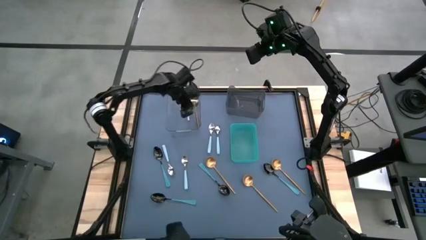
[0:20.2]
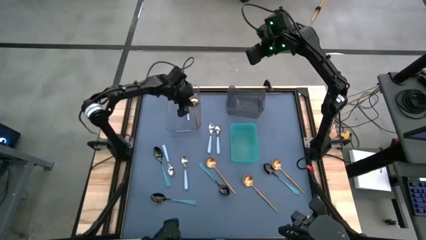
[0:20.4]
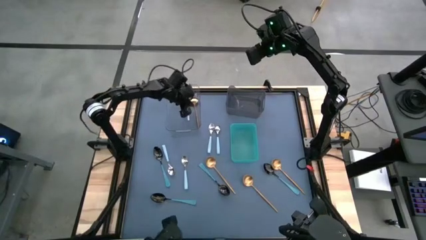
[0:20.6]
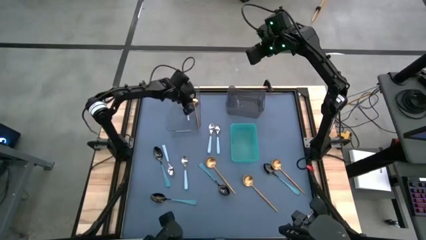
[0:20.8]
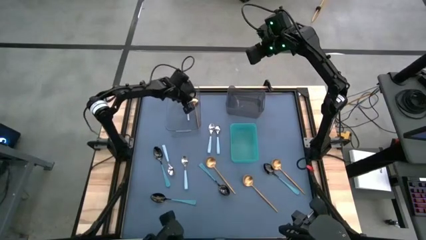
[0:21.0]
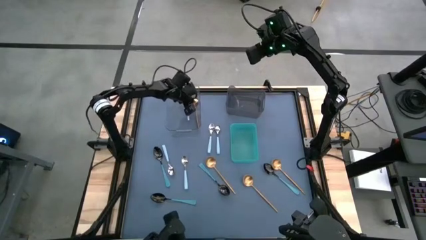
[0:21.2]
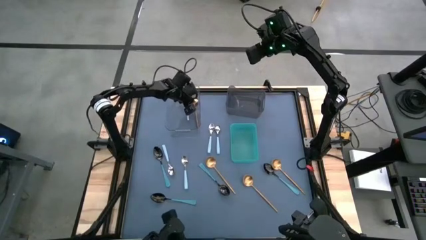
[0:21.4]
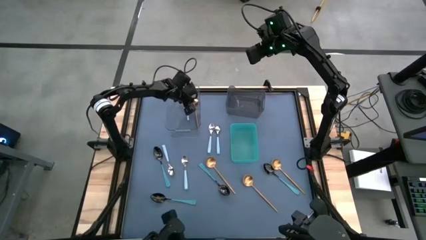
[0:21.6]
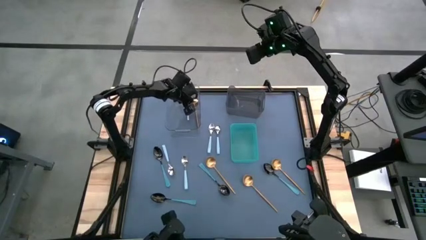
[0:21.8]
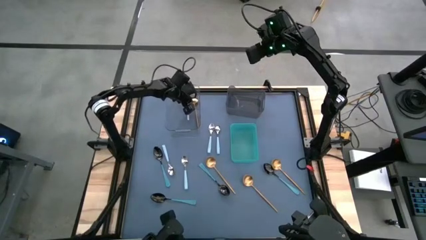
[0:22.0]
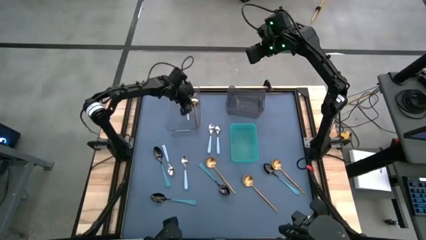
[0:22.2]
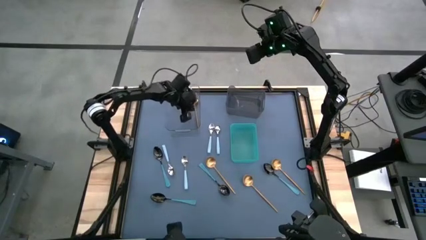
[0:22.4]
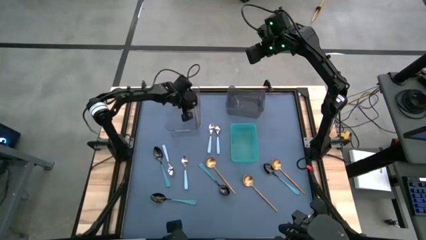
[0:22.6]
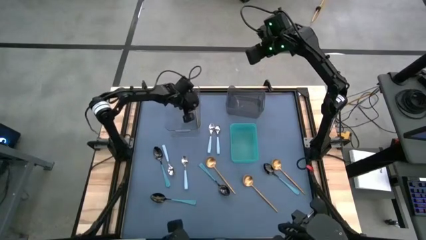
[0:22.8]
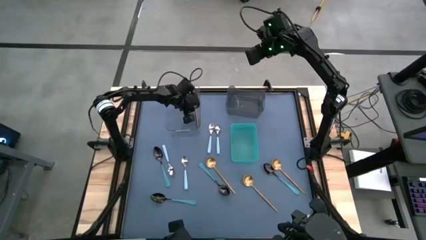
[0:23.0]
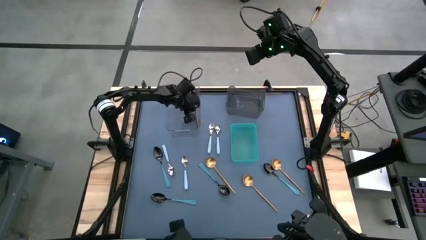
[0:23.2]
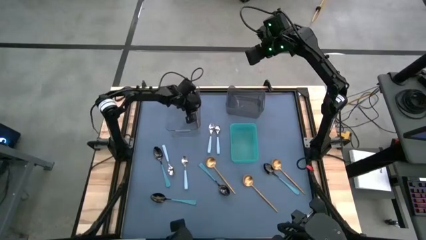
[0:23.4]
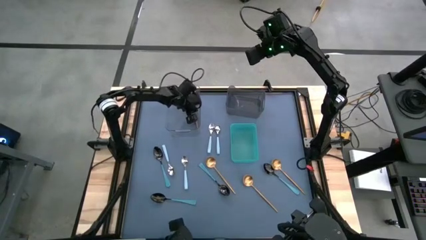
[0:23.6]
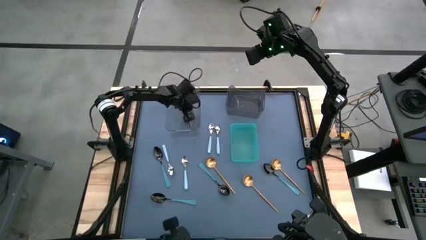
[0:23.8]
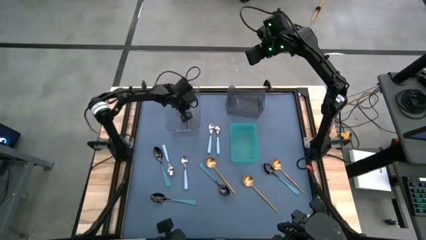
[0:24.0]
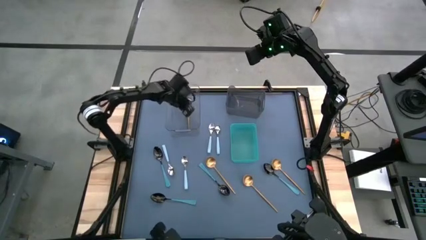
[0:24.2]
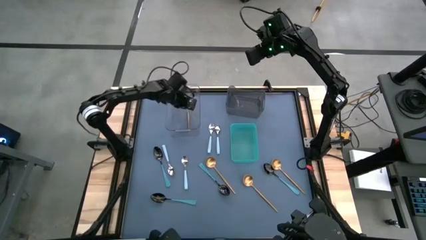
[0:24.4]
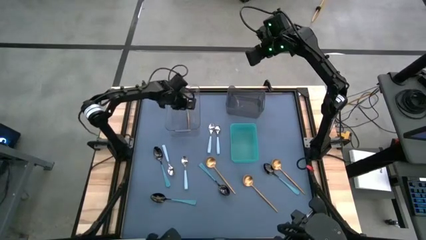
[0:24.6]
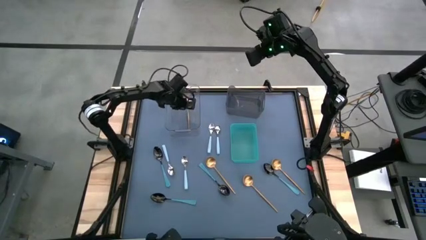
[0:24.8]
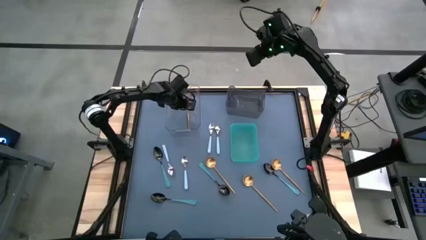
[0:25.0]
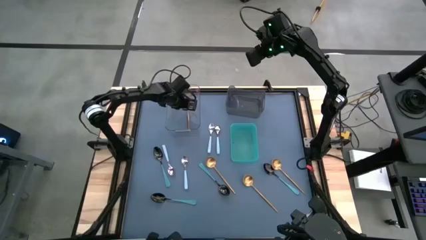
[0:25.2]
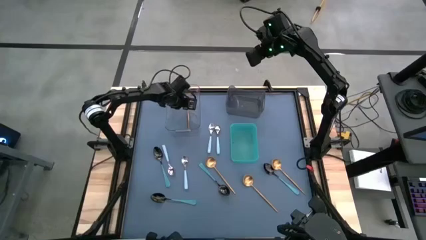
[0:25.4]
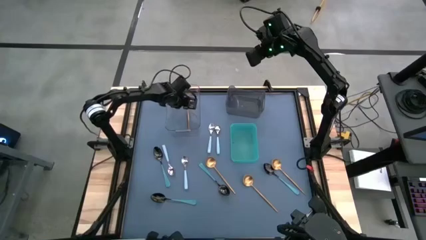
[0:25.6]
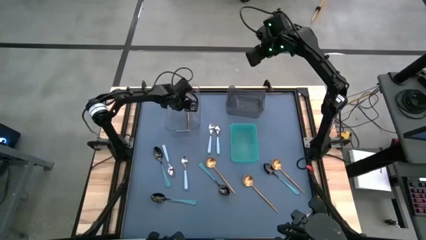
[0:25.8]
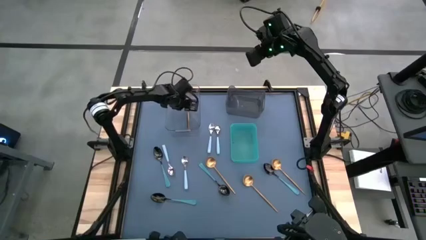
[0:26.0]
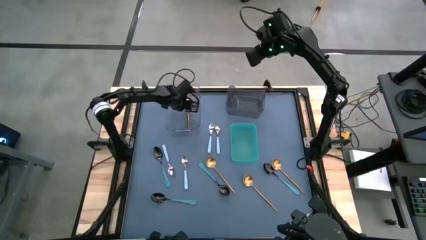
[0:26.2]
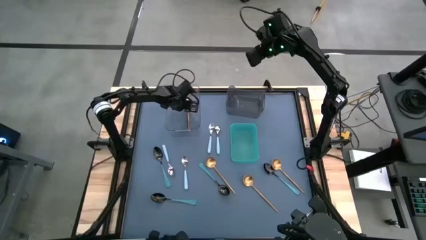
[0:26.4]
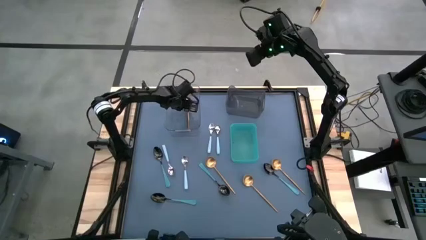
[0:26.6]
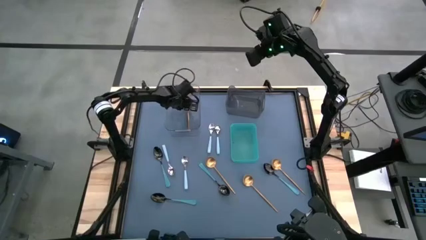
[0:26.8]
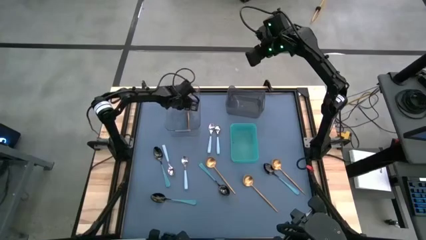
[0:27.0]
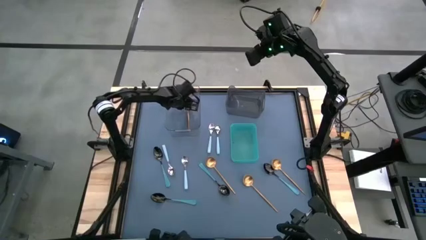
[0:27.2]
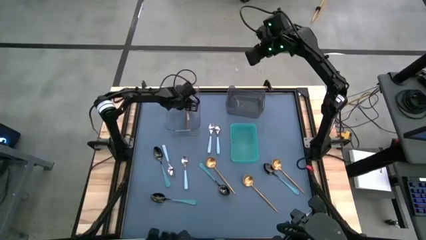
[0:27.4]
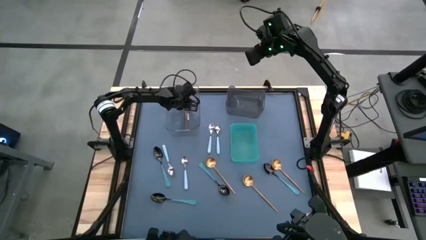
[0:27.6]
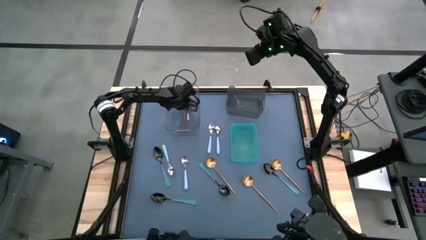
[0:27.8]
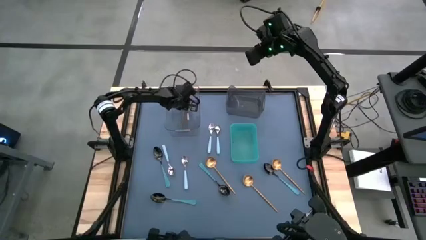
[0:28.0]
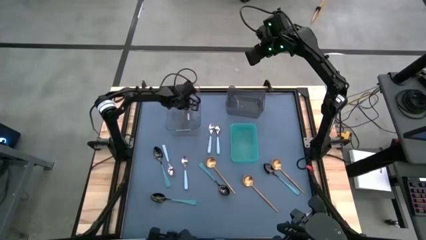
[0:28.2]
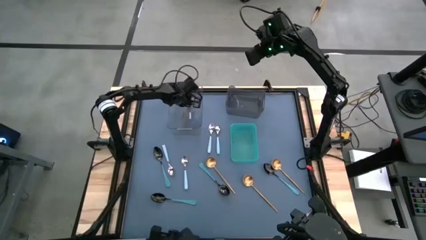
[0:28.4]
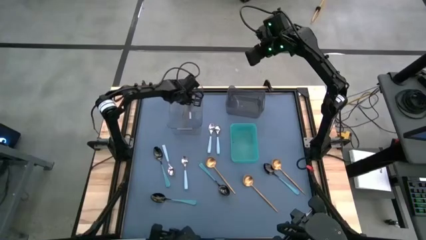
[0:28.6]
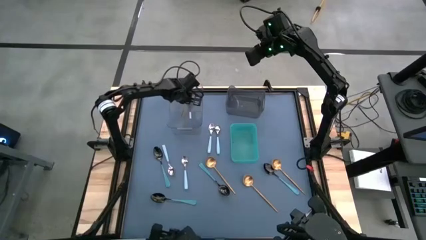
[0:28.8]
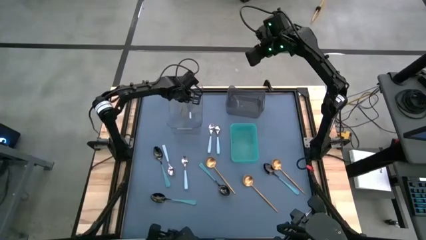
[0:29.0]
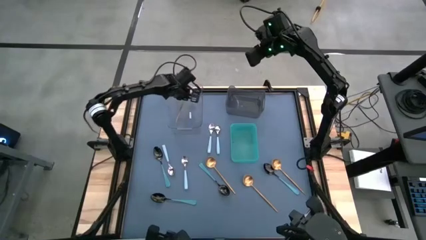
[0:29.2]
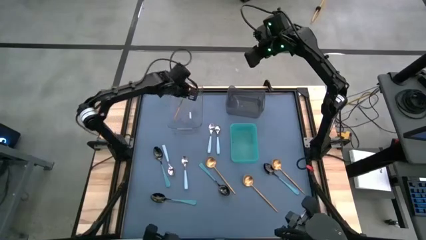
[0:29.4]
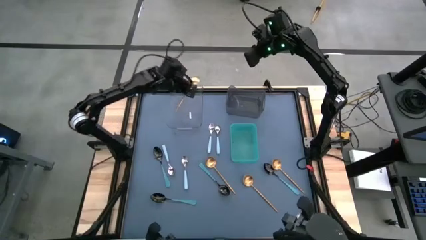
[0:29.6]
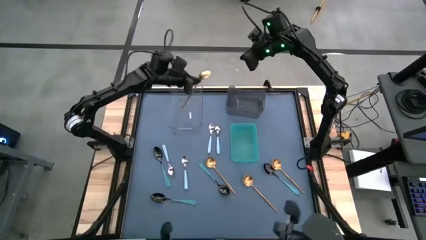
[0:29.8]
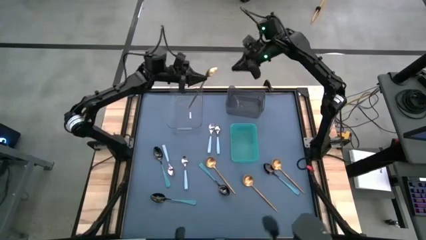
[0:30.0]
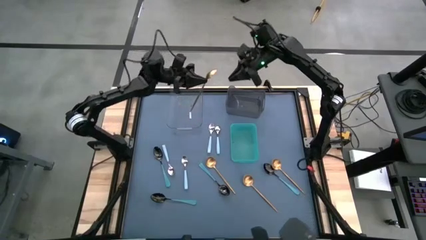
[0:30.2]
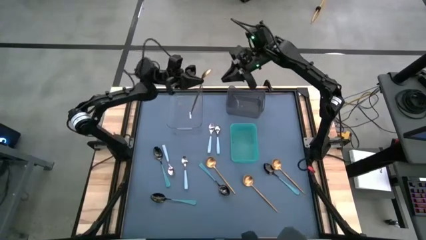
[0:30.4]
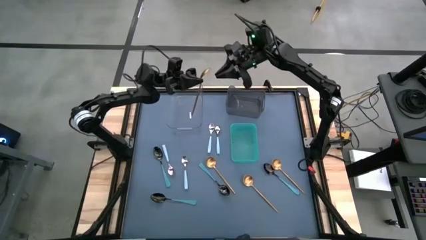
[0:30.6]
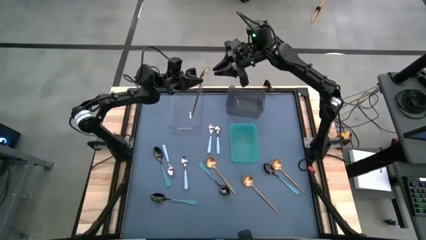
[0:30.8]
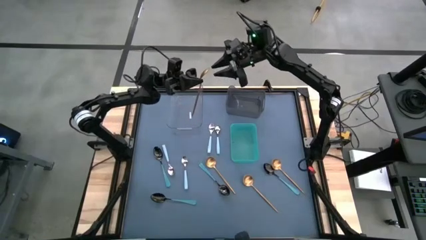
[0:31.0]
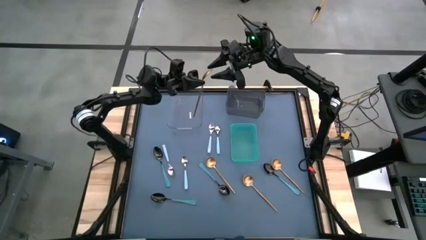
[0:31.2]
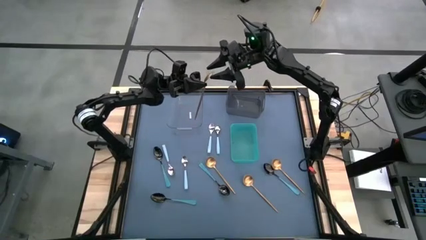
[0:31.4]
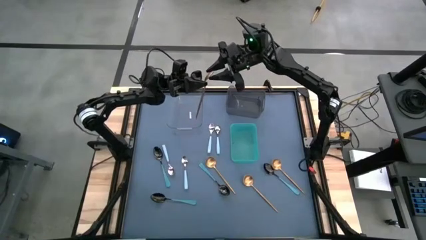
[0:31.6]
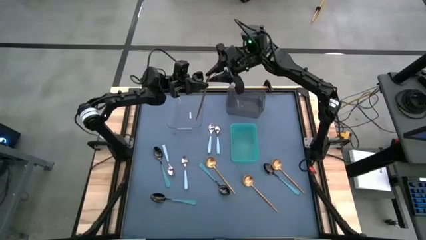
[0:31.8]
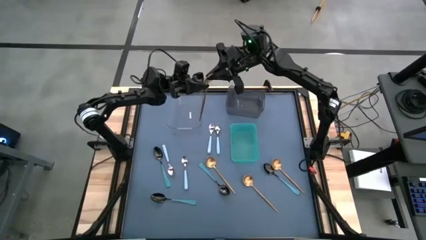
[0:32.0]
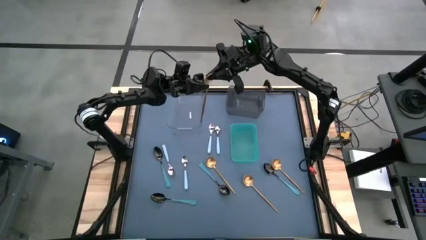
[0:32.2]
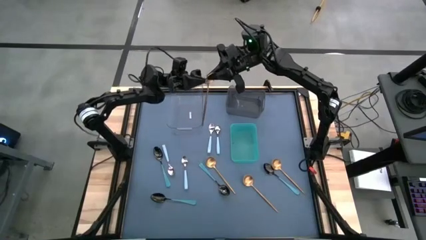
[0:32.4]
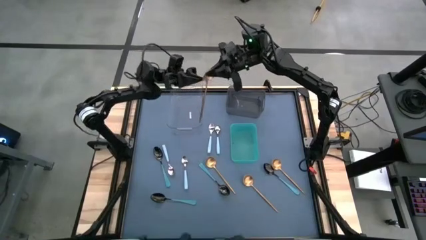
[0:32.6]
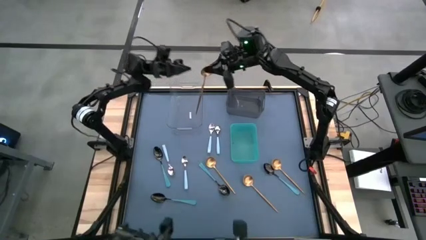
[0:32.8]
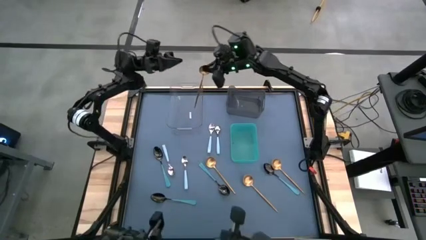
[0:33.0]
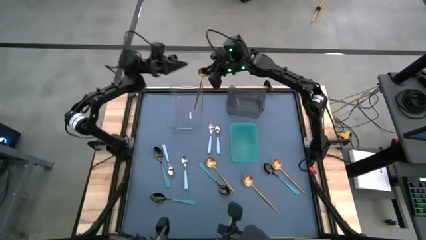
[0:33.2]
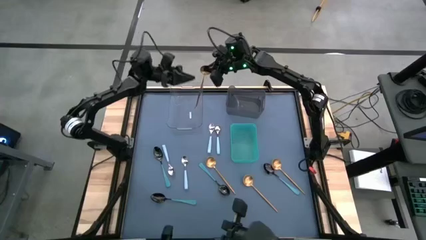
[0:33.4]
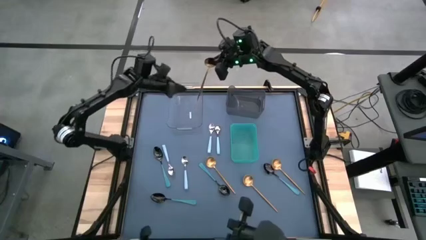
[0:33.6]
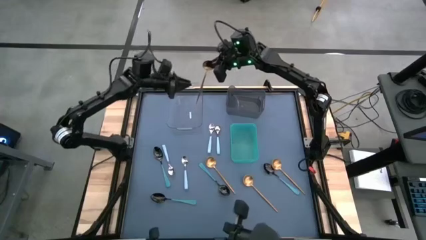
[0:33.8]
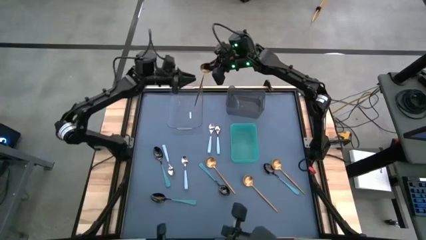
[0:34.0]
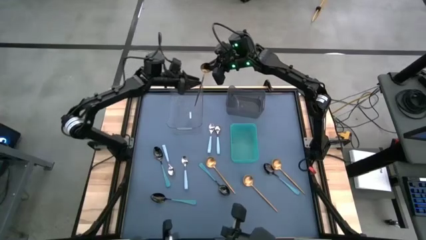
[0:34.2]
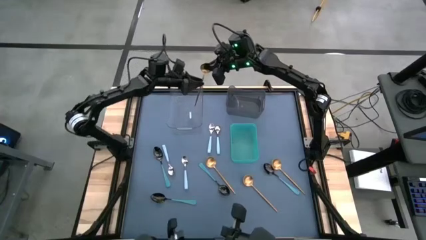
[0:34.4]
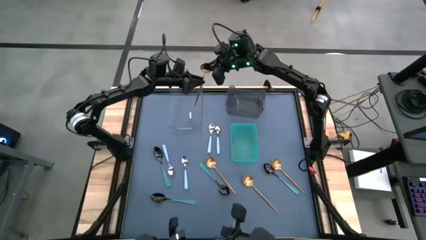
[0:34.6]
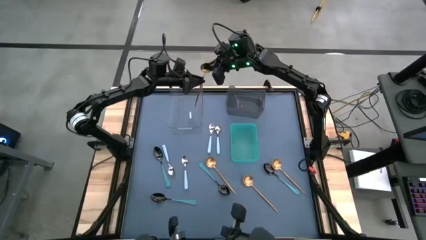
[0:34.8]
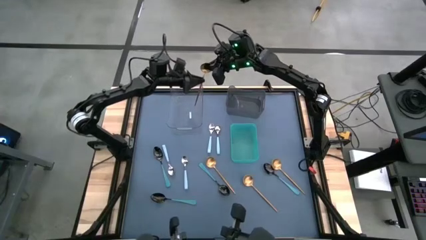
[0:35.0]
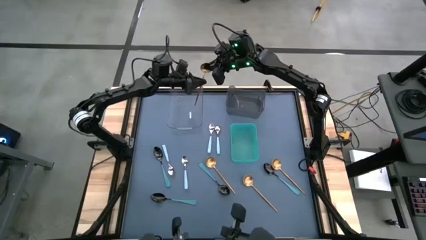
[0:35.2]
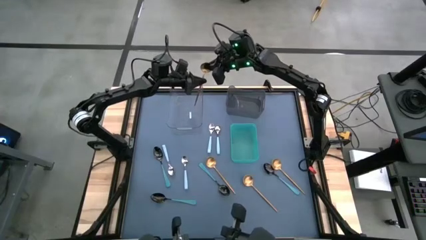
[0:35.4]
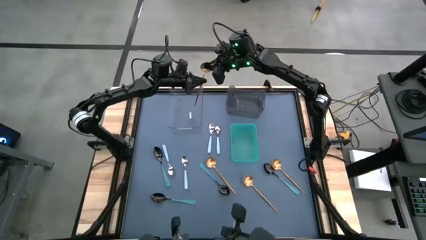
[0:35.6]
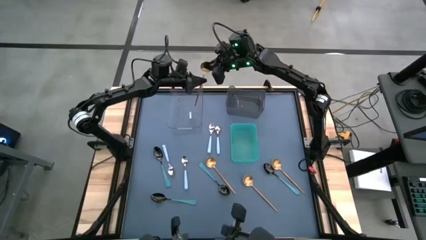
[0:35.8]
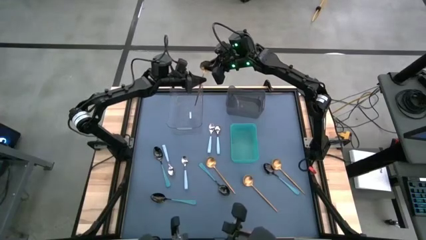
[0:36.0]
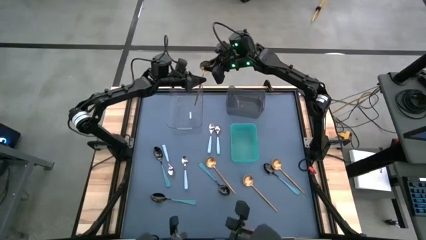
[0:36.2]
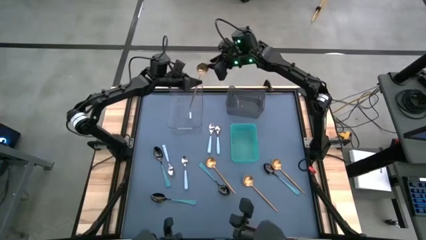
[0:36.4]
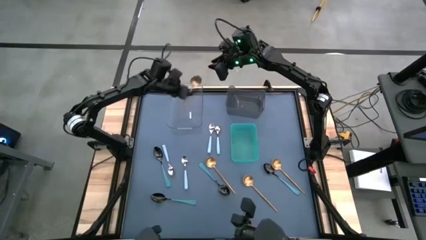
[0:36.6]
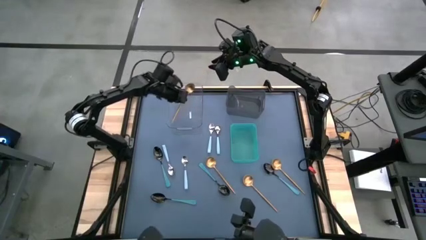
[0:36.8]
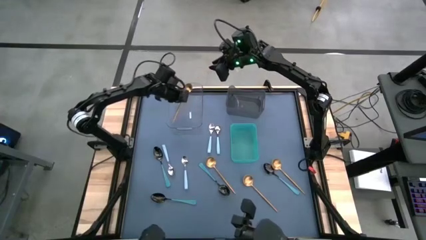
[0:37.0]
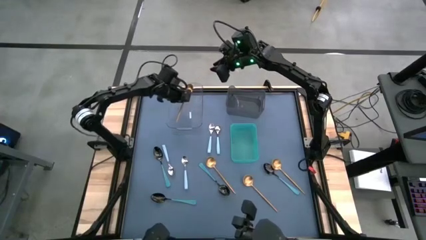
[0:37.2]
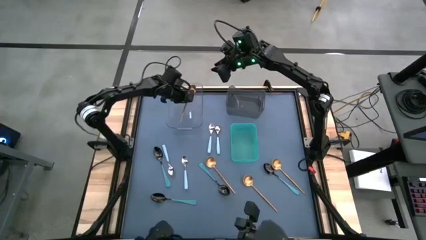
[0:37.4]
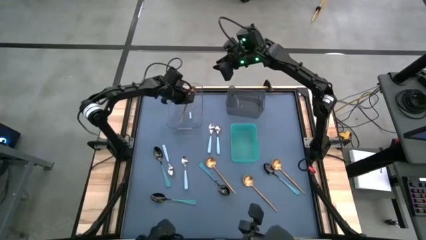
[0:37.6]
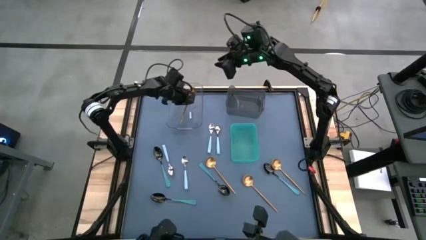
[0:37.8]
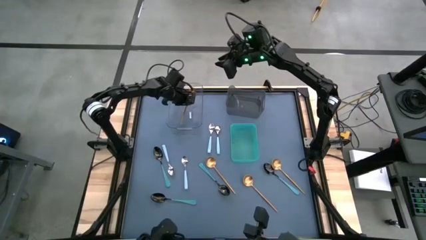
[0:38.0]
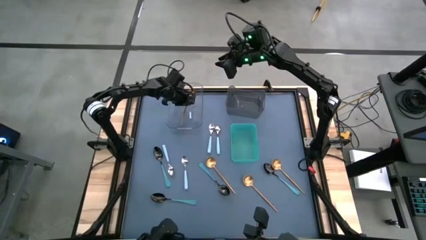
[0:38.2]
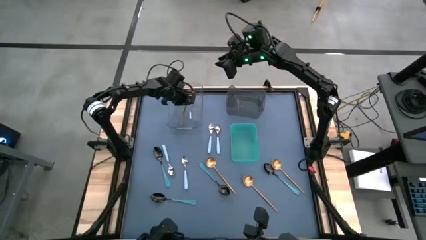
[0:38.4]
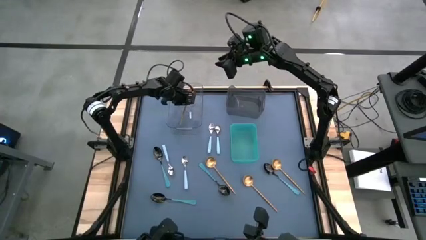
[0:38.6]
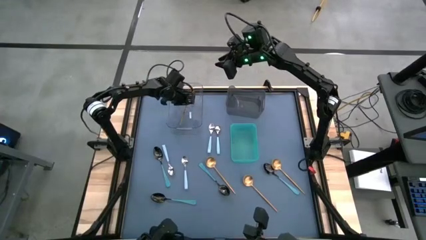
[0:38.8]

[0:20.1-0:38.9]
Task: Sort silverware by color (type)
Put the gold spoon into the transparent bin
